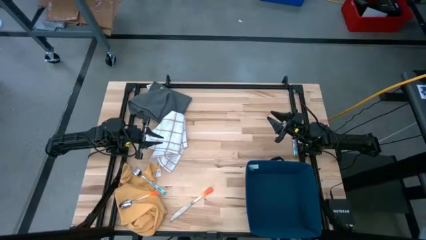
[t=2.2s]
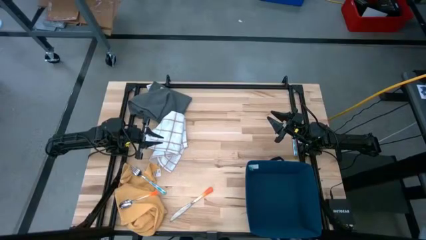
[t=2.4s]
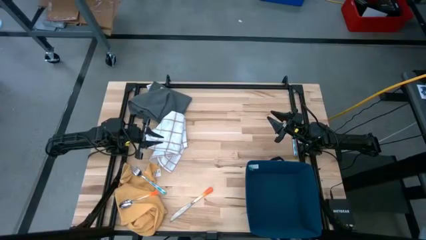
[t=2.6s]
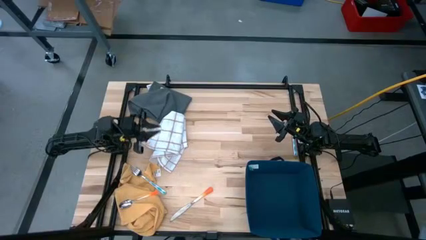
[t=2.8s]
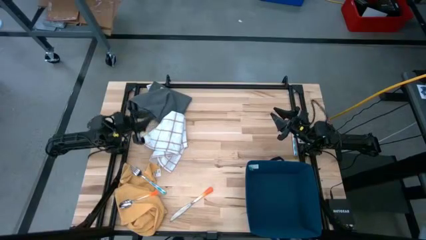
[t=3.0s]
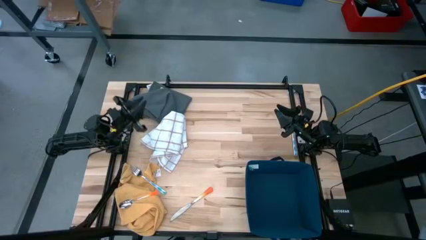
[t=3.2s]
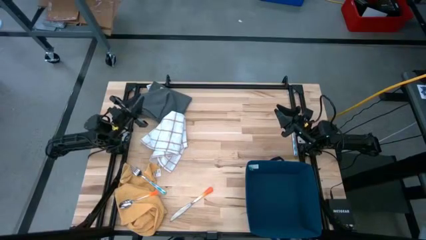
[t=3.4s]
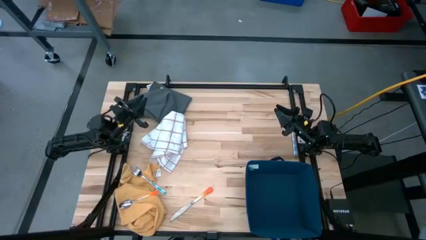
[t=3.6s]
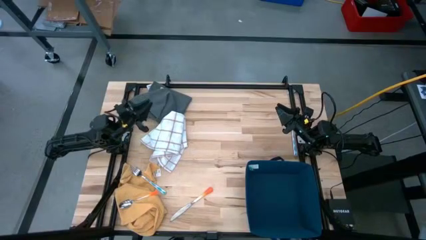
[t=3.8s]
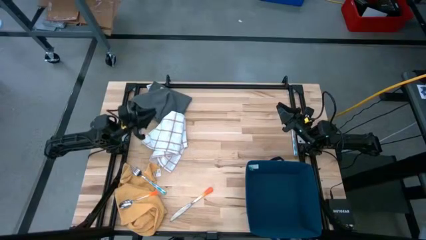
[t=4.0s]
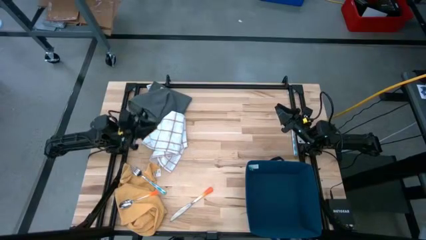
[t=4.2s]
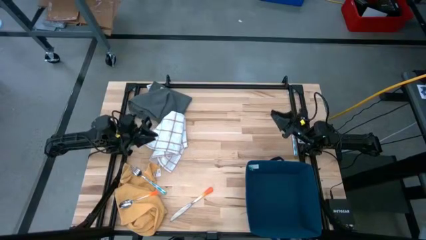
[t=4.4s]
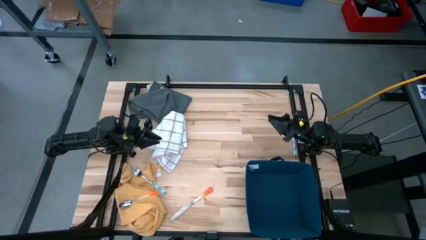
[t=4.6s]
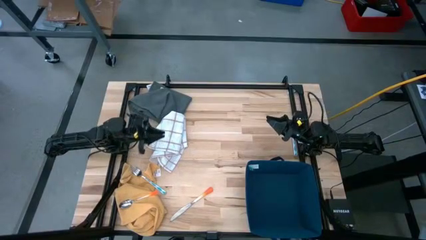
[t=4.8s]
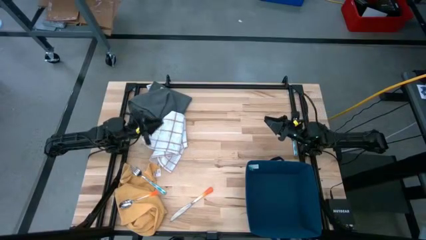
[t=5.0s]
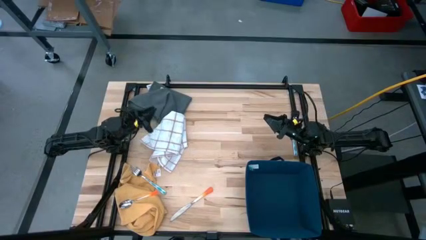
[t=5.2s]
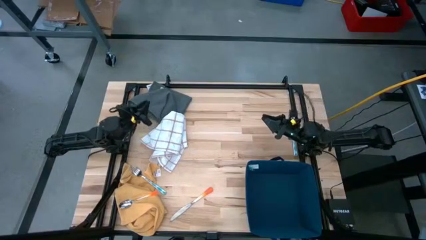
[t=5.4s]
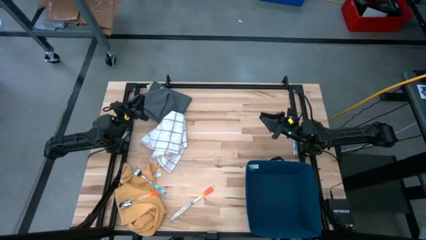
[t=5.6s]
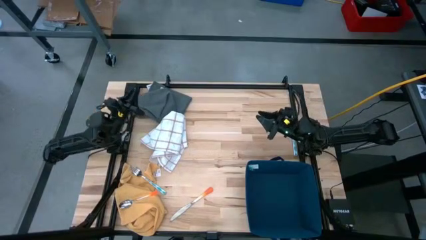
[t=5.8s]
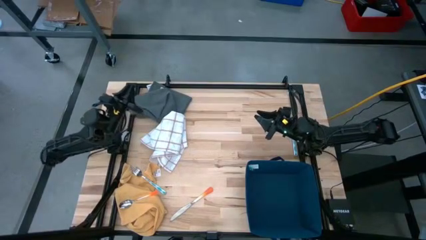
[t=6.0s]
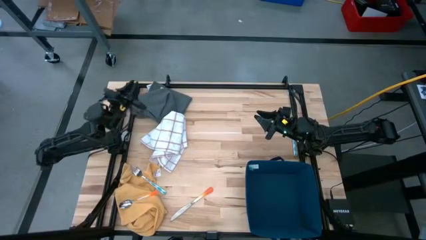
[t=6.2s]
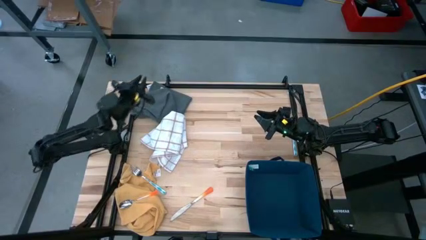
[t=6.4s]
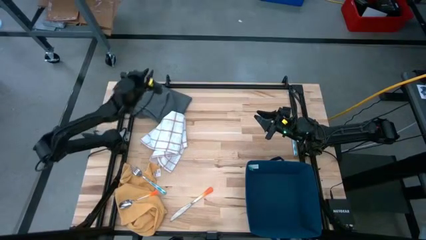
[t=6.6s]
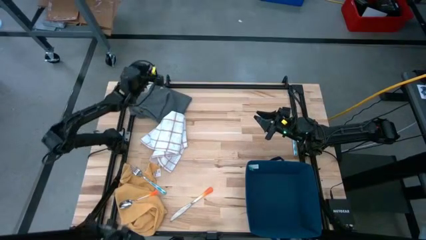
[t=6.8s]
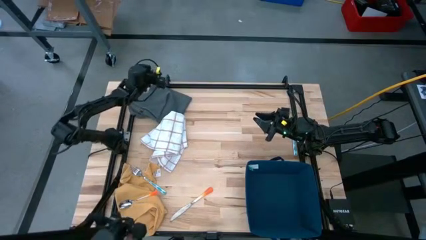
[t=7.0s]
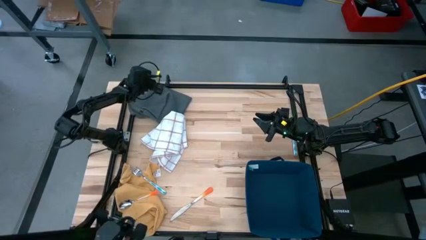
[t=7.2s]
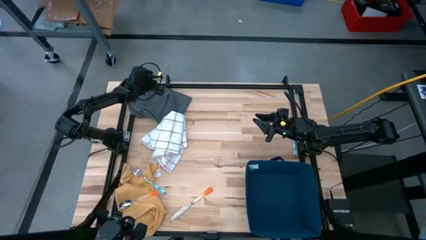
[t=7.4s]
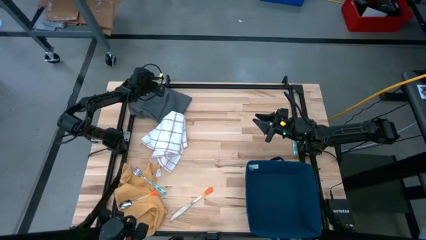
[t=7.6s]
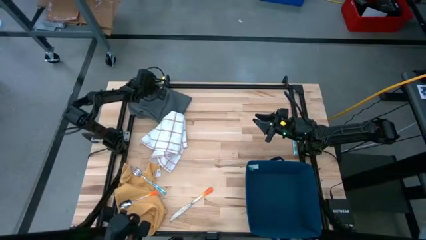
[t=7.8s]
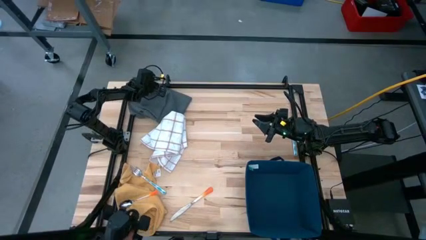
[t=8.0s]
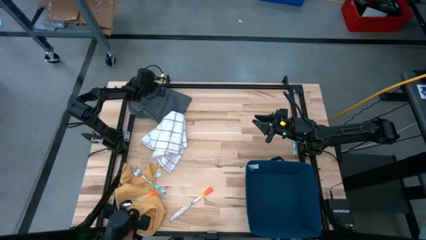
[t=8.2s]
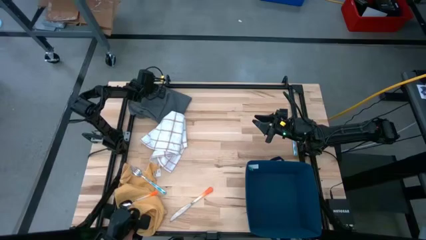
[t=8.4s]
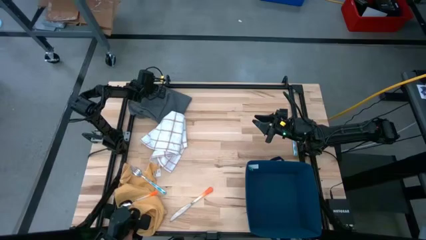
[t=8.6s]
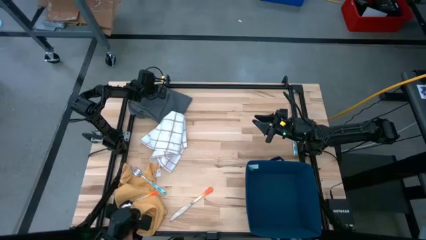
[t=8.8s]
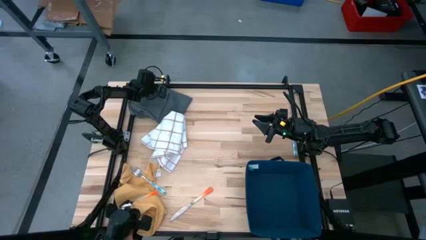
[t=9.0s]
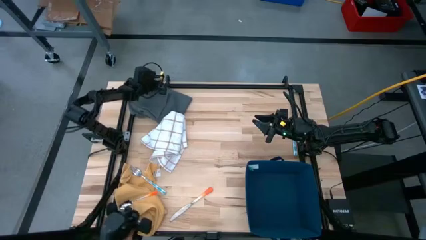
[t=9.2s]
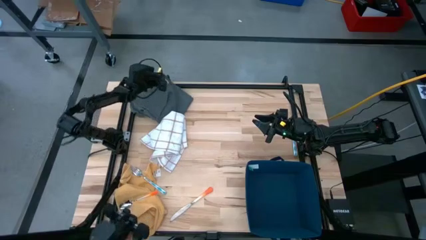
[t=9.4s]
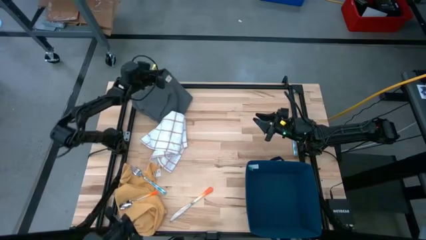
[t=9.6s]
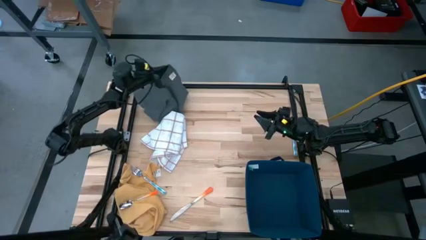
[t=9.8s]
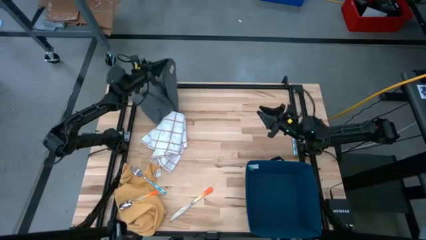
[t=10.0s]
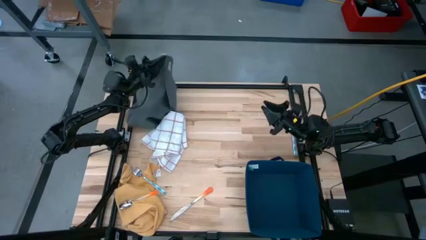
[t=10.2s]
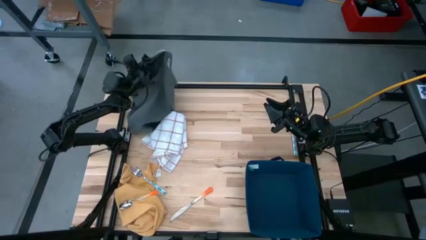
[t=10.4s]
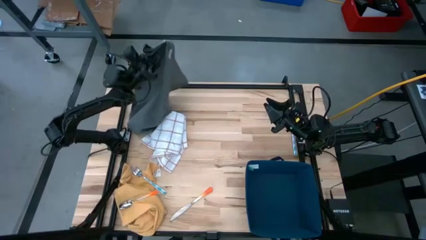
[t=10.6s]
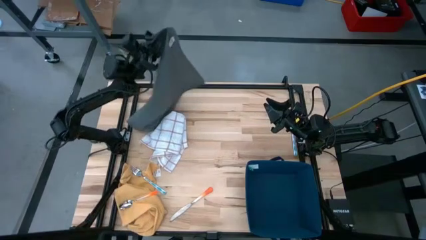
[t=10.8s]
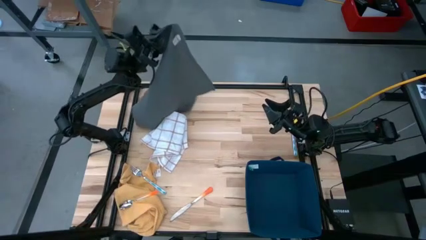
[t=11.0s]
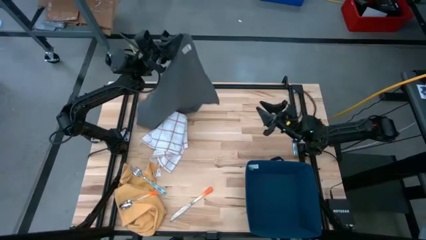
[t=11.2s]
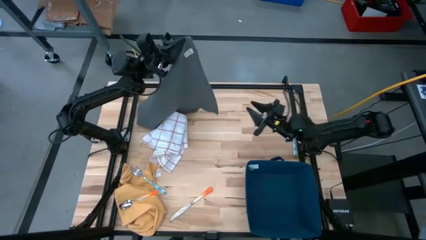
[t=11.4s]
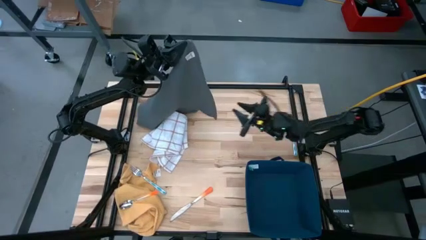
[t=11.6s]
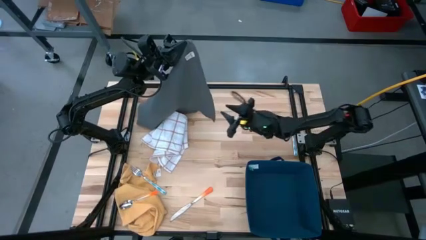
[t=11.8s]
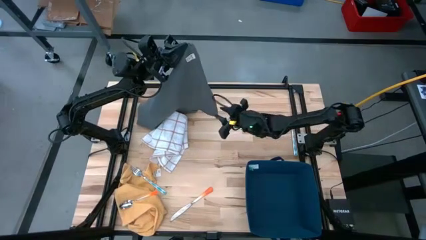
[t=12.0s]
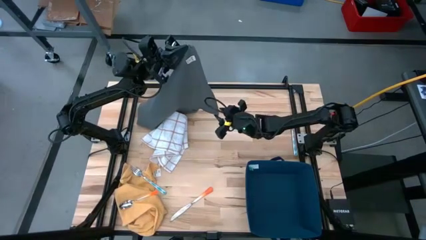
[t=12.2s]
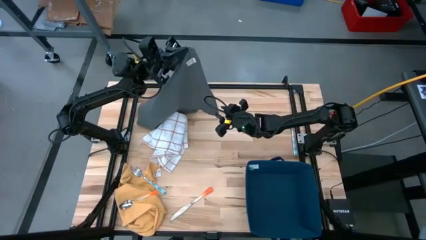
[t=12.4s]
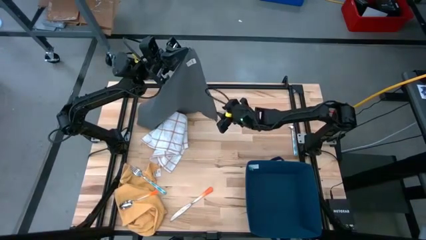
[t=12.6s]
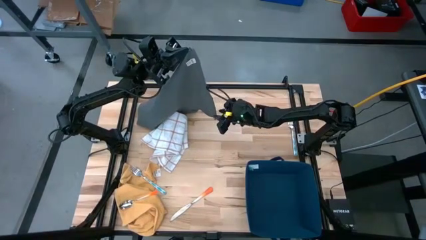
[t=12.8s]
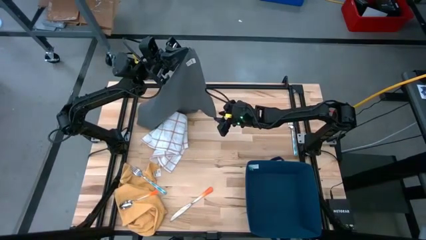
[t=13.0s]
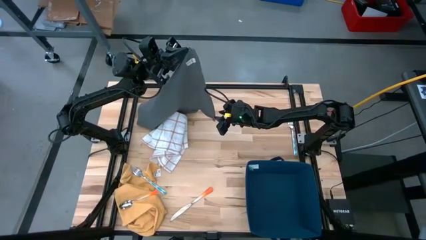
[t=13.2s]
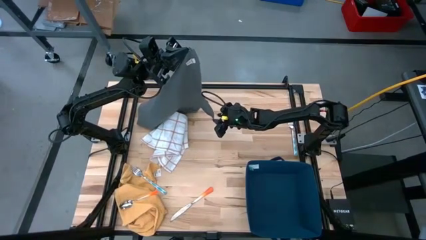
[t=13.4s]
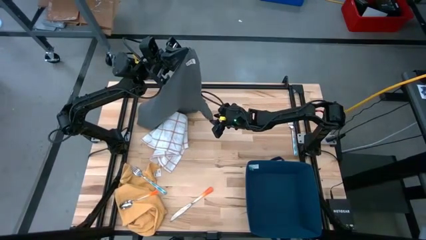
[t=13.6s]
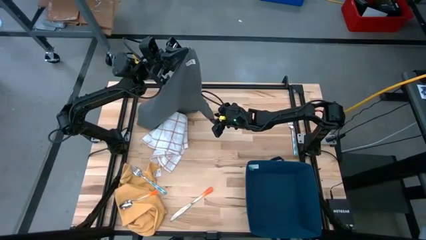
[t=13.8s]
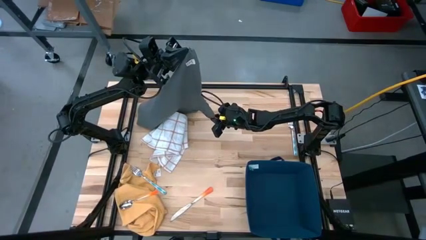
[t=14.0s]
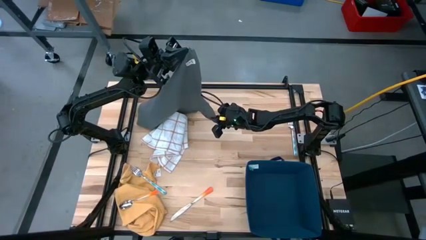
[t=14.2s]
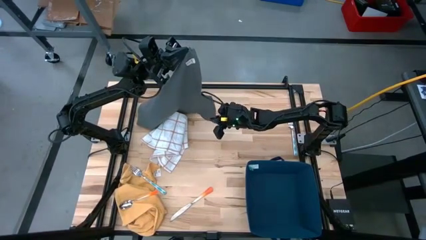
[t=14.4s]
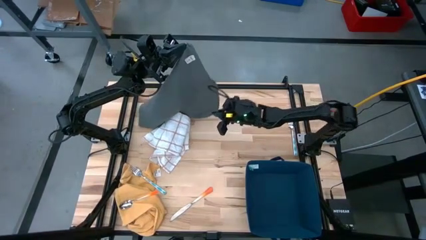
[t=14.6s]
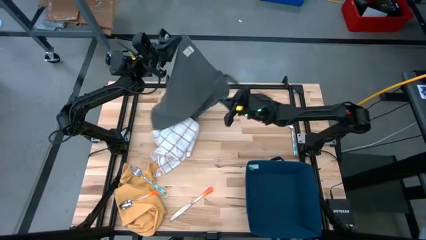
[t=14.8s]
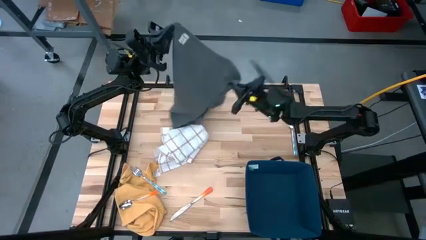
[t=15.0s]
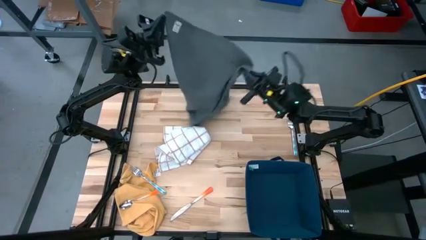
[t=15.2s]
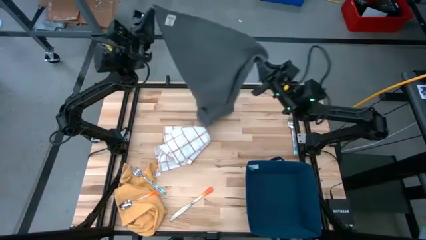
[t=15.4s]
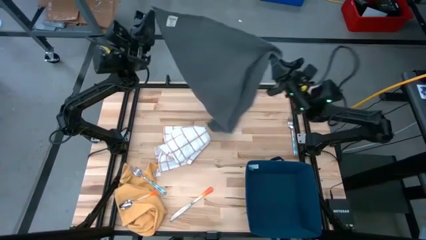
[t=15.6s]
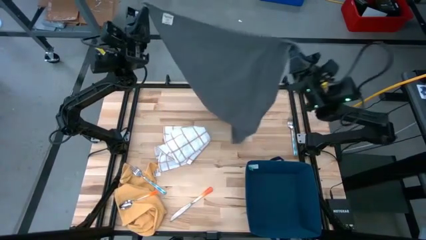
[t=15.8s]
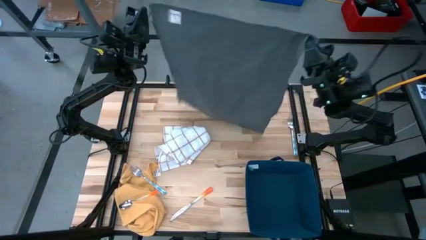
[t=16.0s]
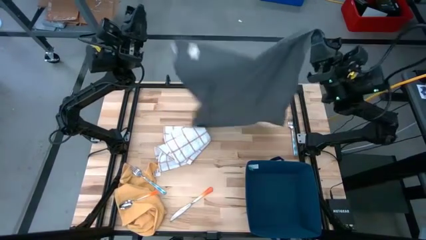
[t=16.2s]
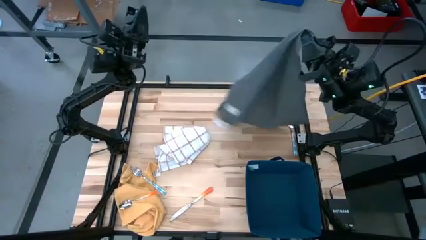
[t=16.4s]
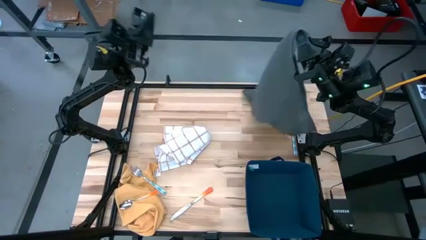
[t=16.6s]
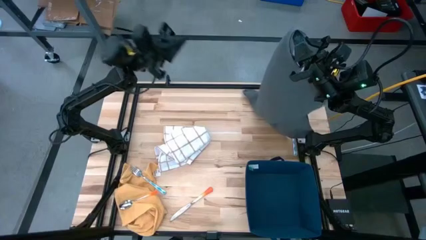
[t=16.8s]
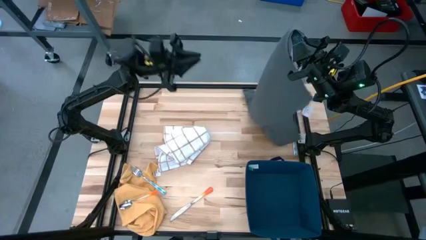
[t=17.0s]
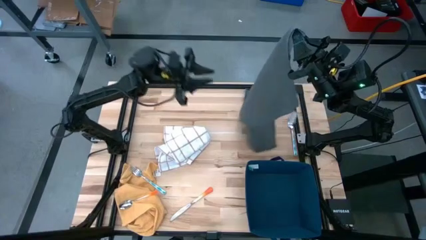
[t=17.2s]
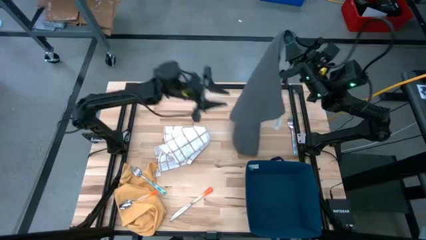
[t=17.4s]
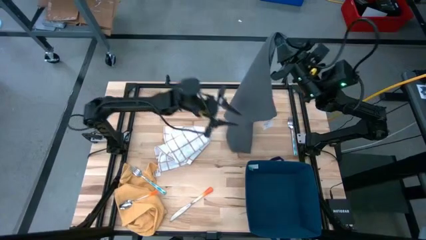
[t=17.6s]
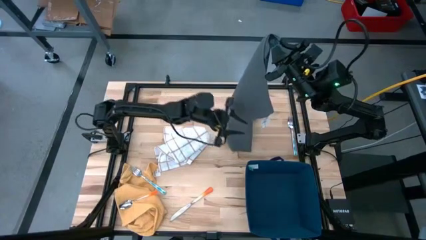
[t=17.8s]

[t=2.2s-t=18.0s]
Task: Fold towel
Fold the grey towel
